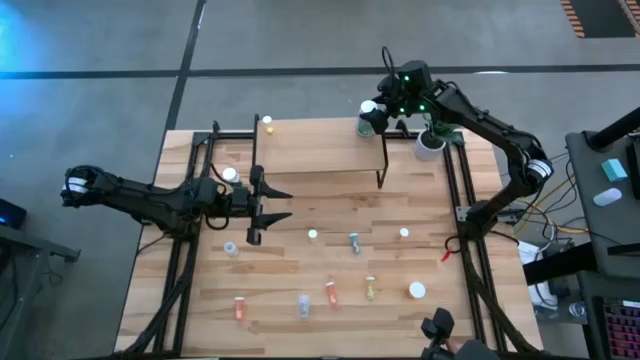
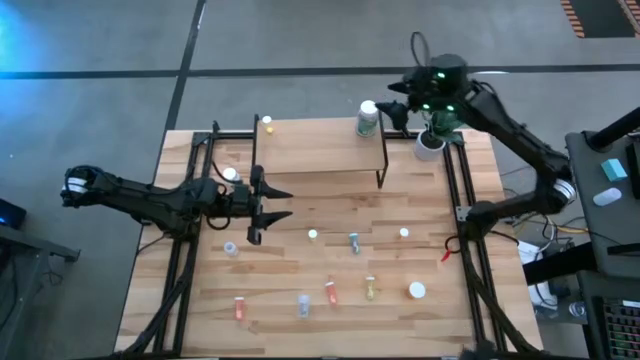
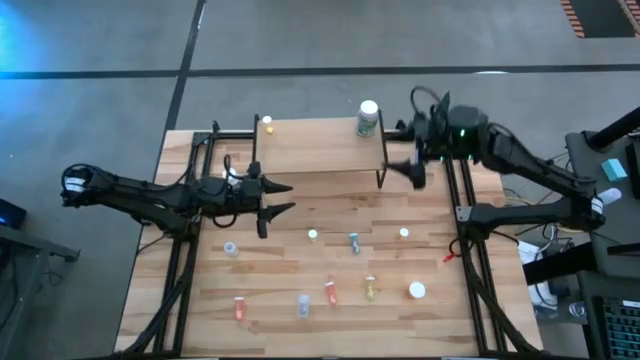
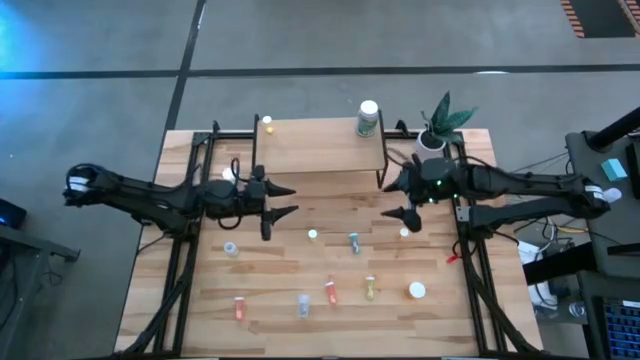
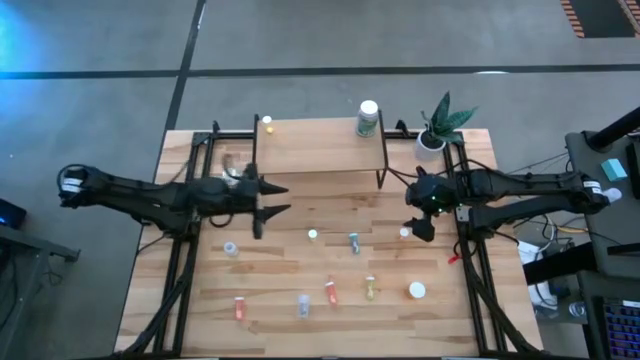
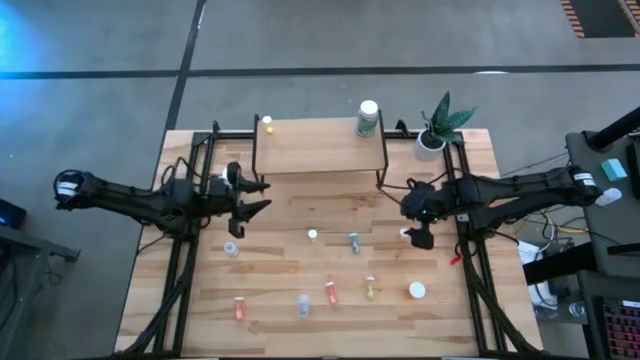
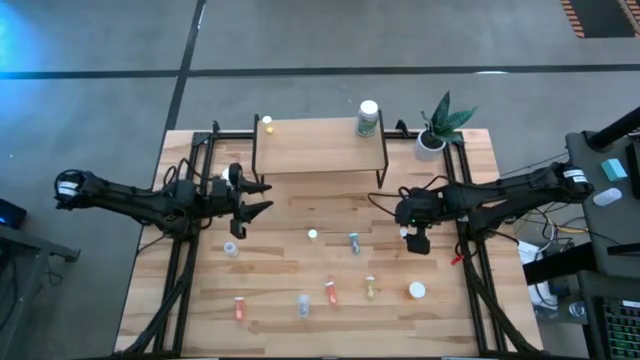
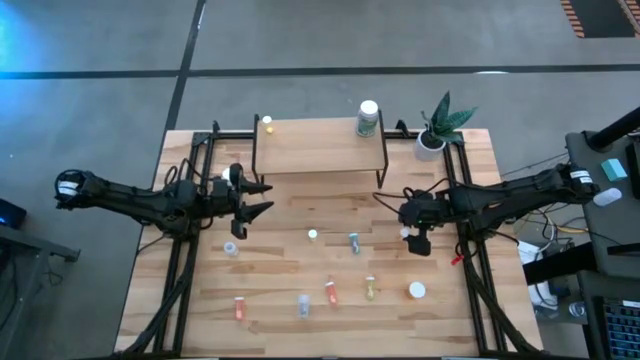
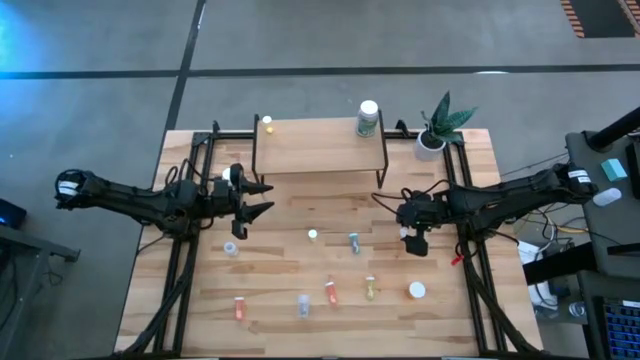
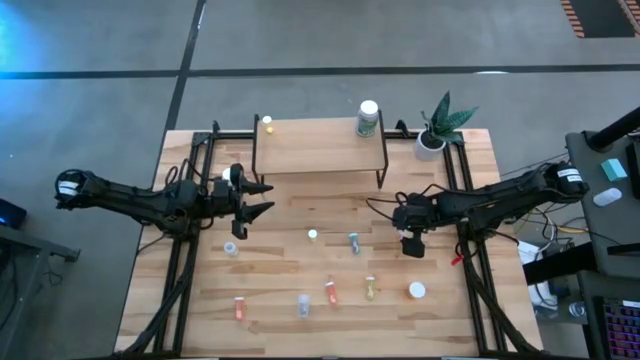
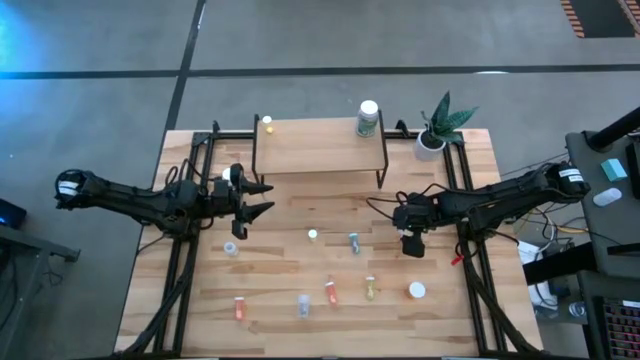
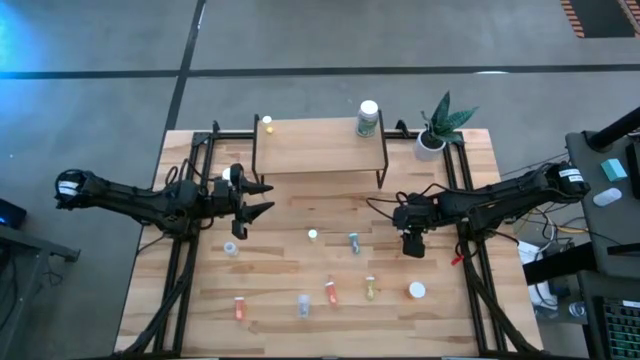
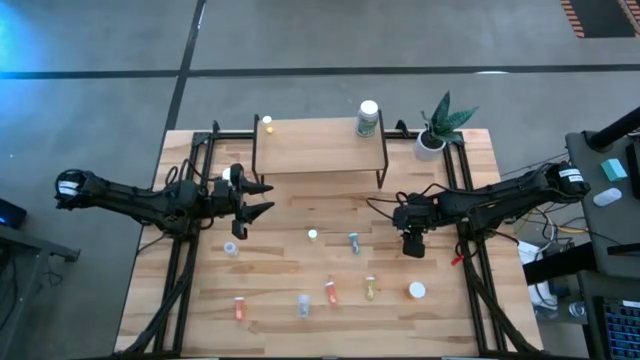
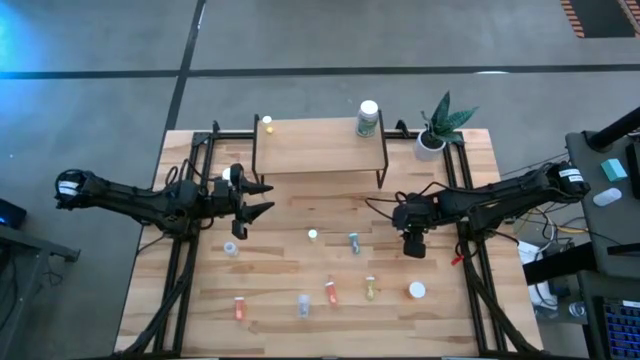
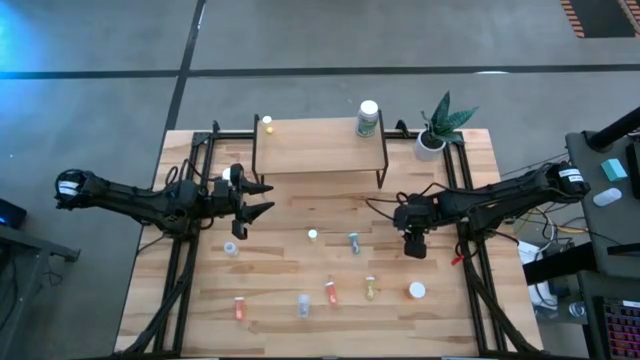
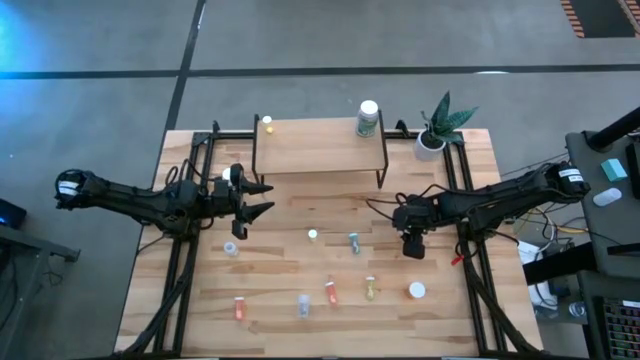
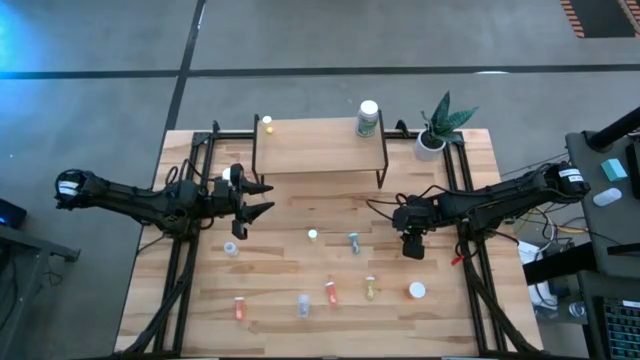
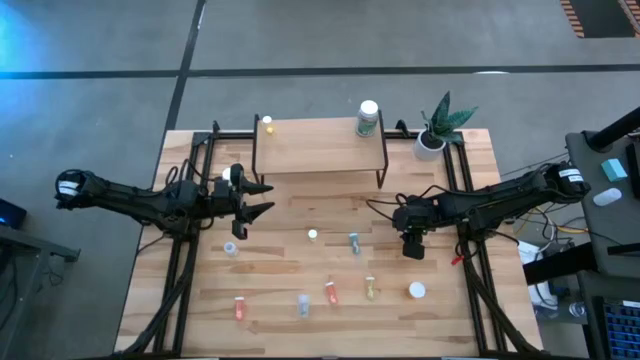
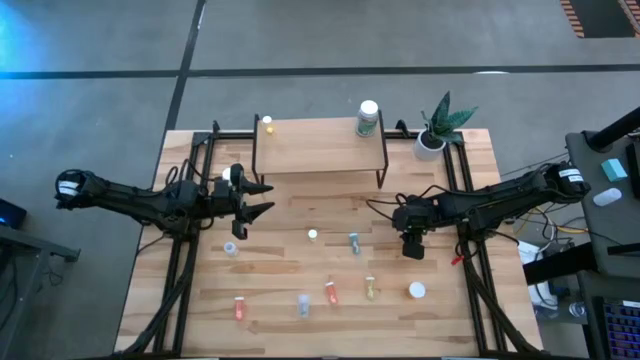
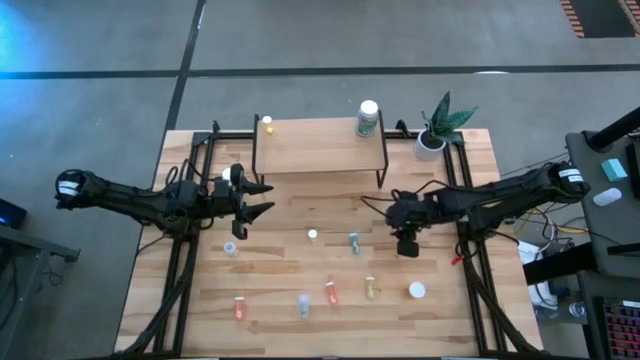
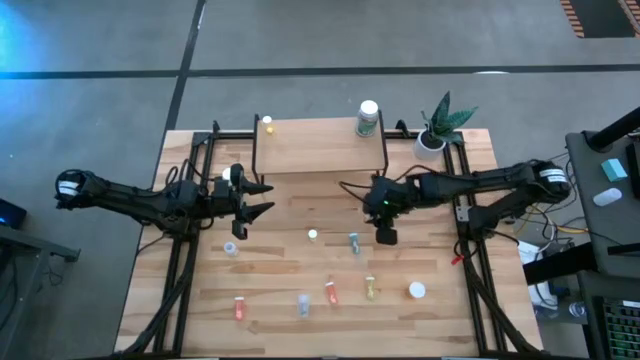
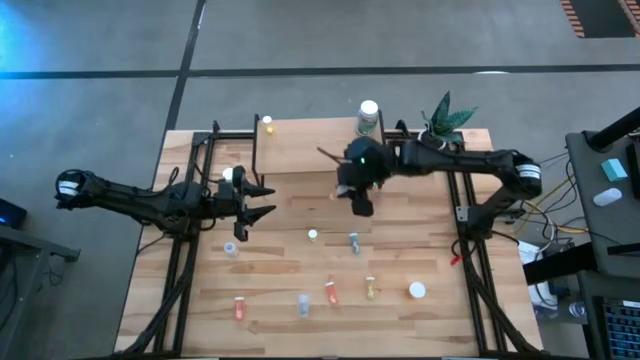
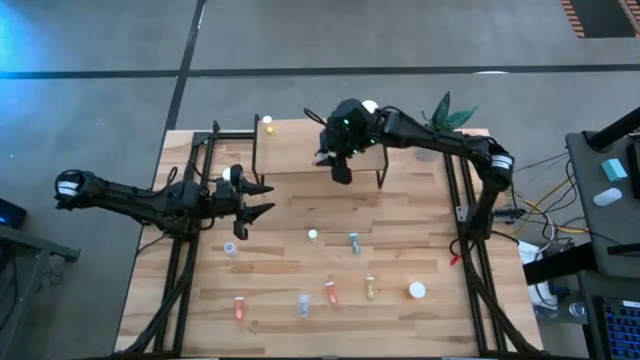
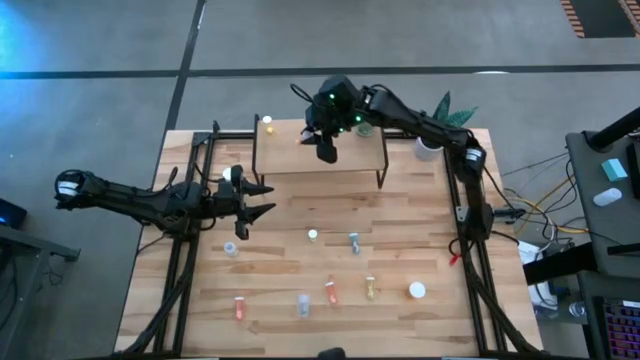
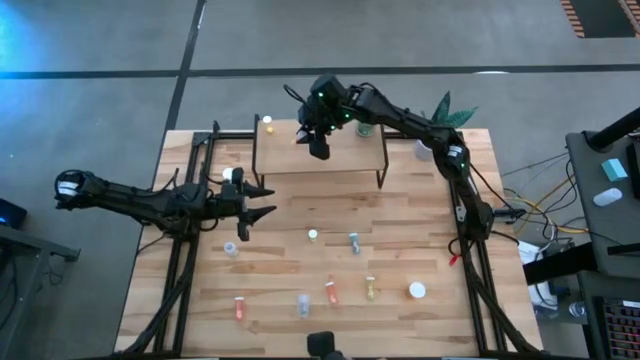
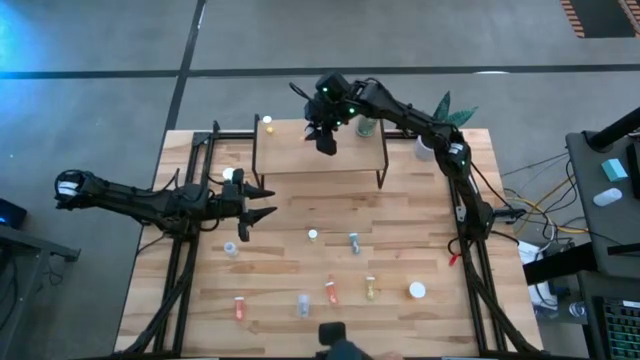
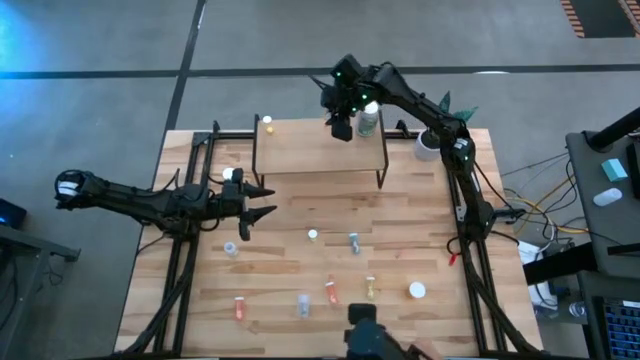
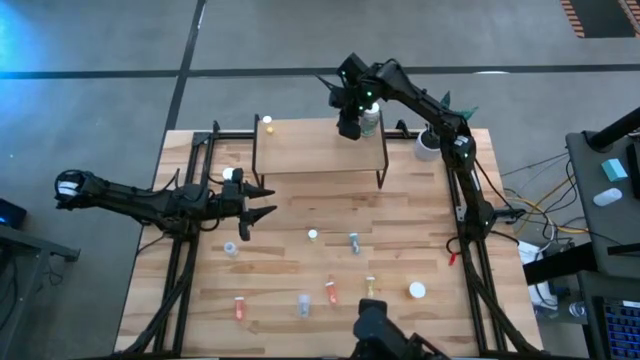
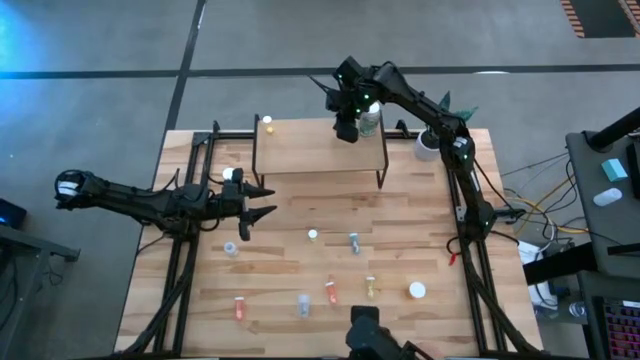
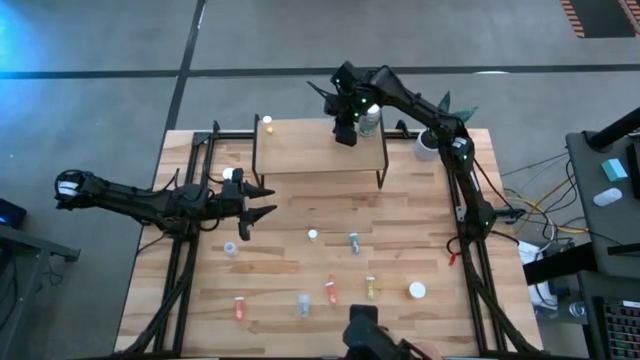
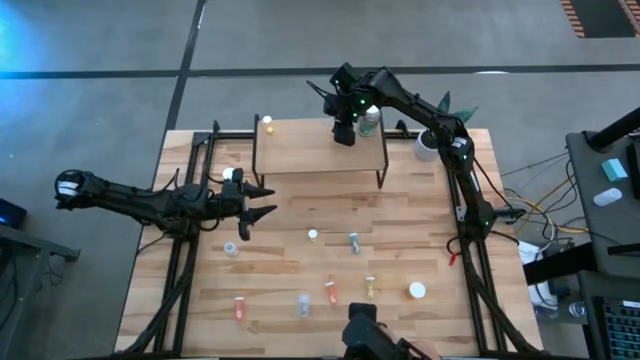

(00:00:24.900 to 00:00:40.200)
Task: Pick and place medicine bottles onto shelf by color
Put the yellow pill bottle on the shelf

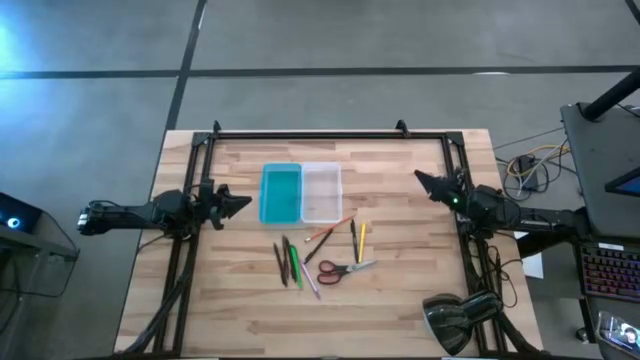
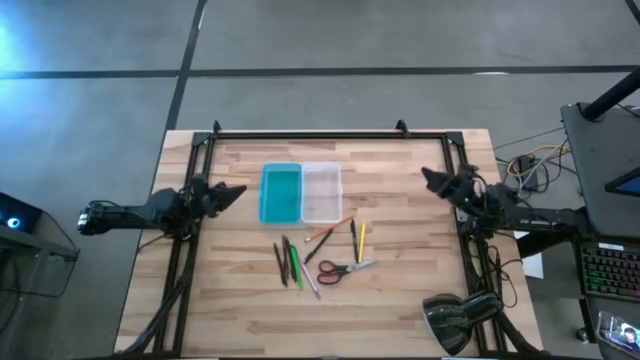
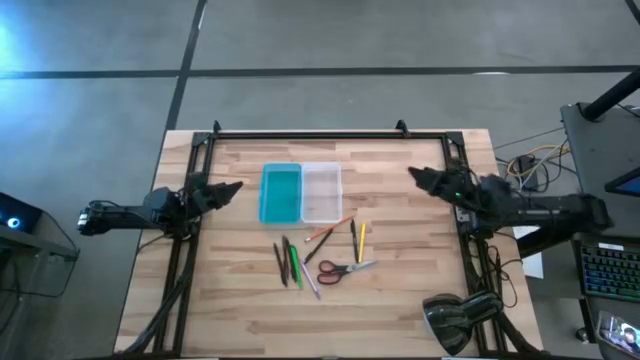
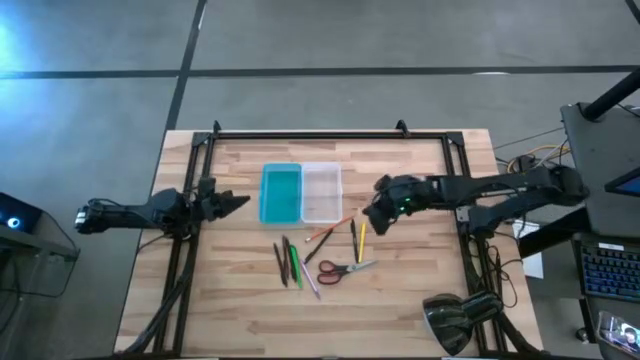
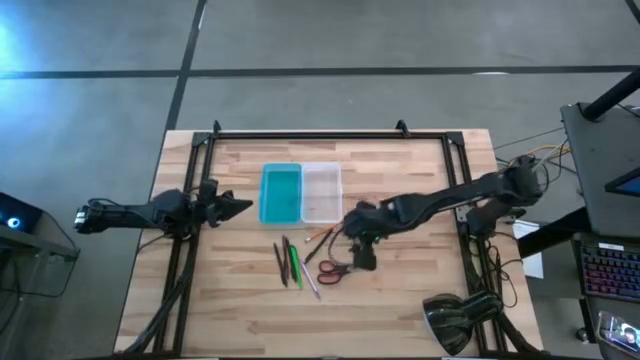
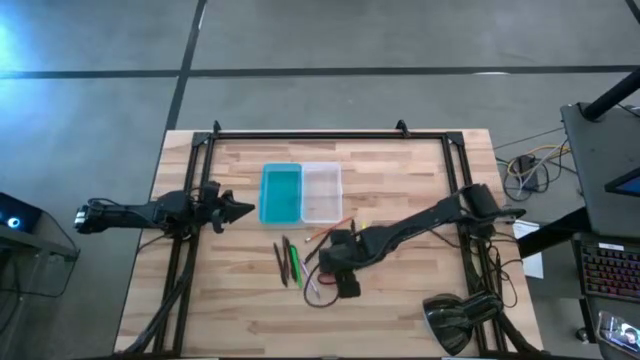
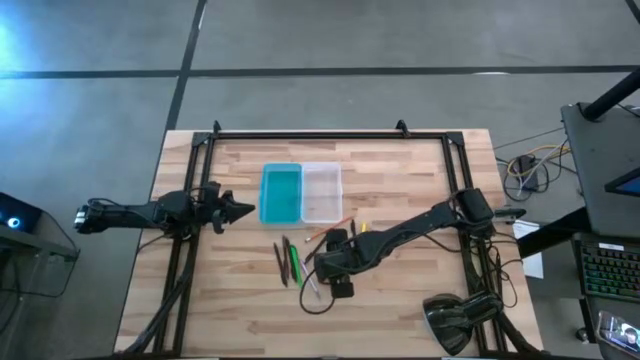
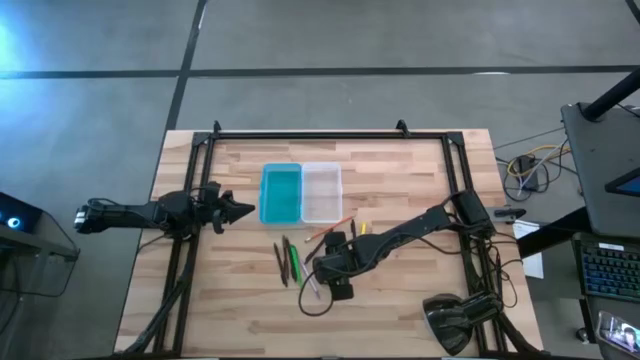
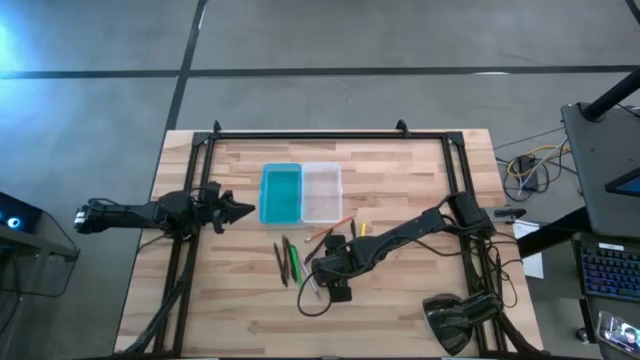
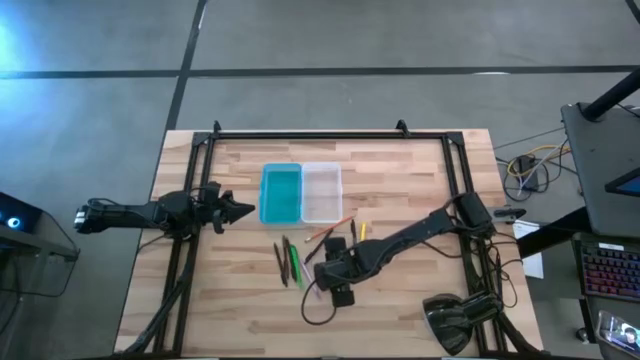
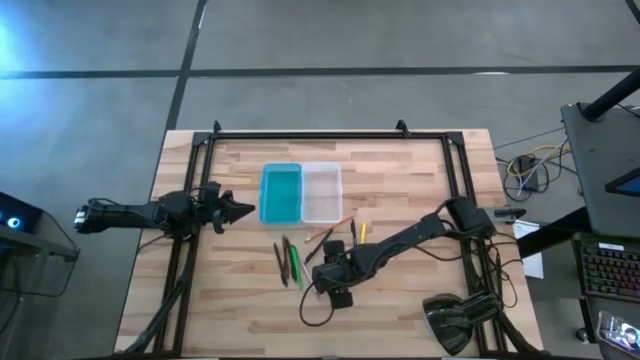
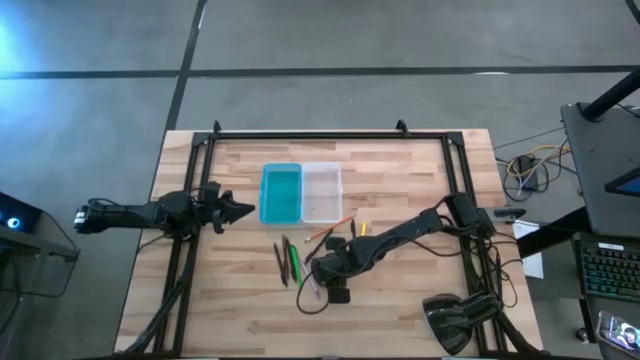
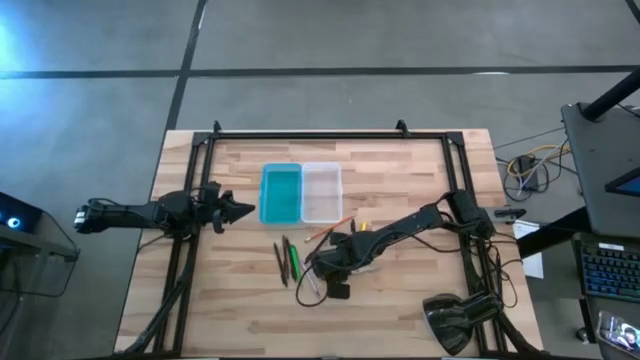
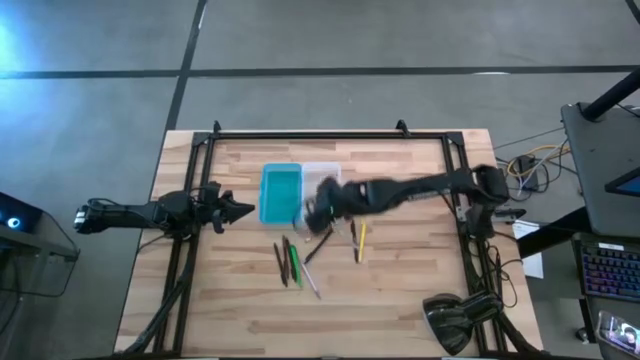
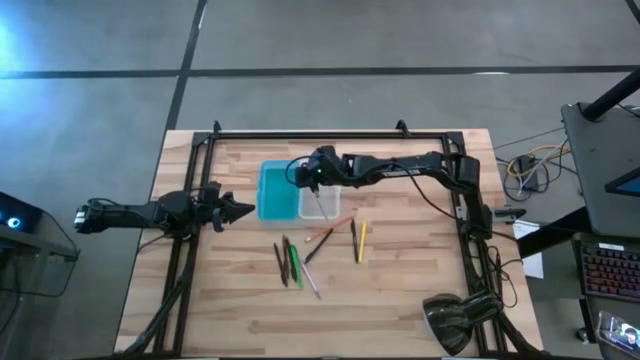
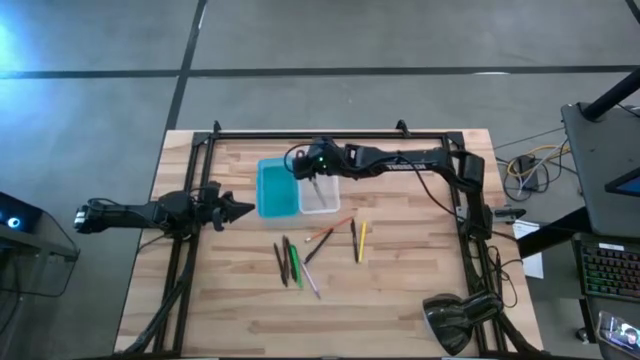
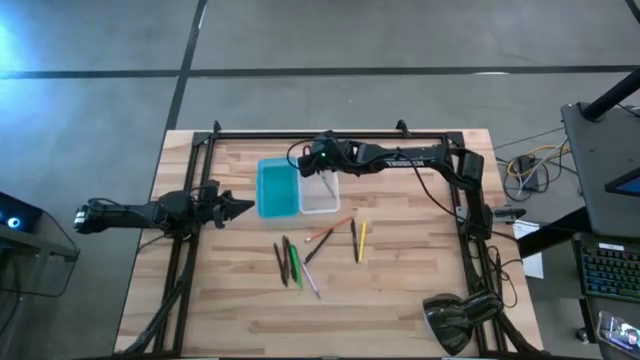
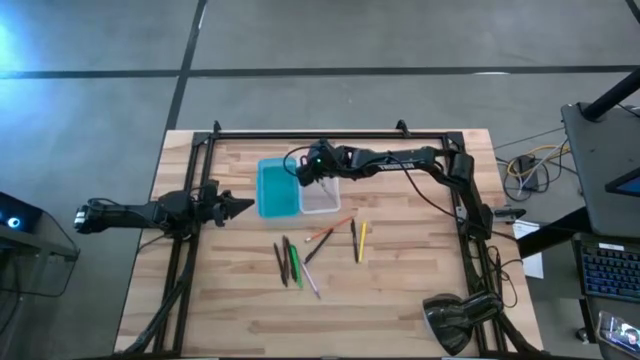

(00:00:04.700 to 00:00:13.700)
Task: Pick & place school supplies into a supply box
Put the scissors into the pencil box
